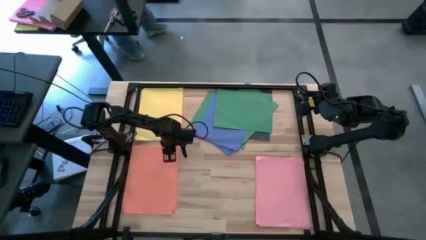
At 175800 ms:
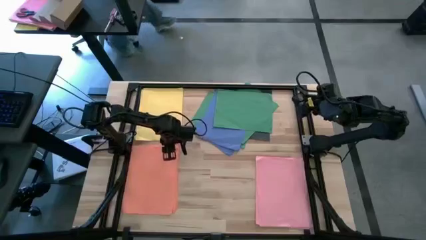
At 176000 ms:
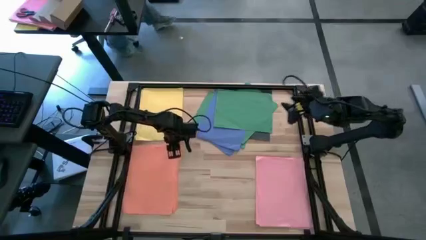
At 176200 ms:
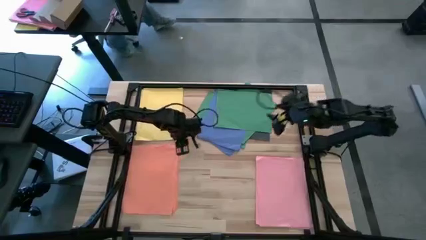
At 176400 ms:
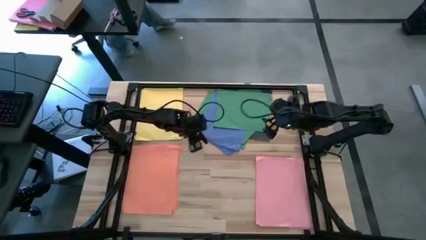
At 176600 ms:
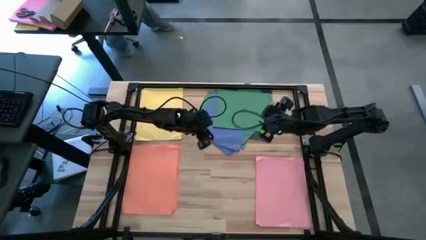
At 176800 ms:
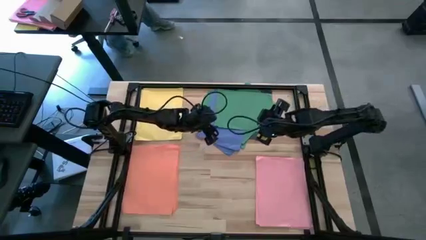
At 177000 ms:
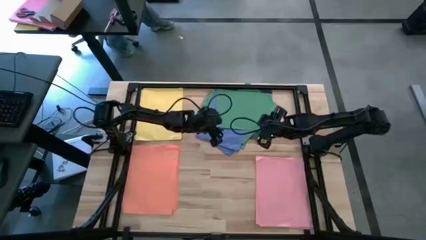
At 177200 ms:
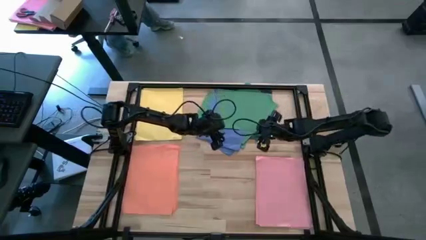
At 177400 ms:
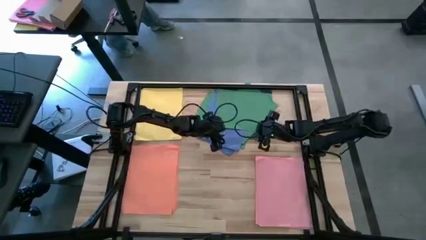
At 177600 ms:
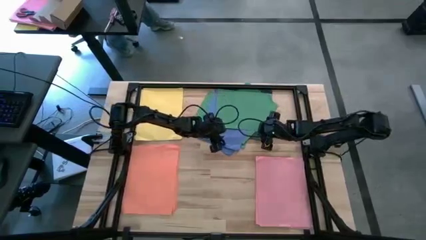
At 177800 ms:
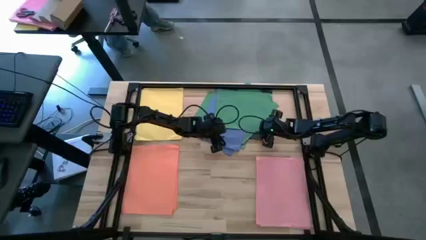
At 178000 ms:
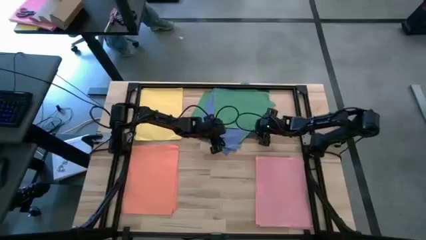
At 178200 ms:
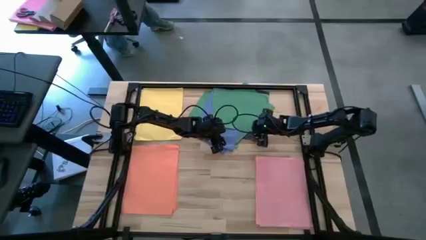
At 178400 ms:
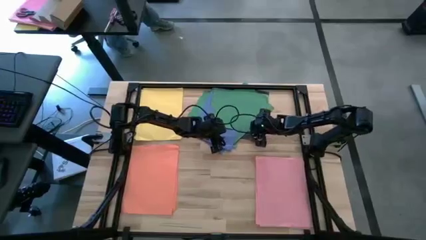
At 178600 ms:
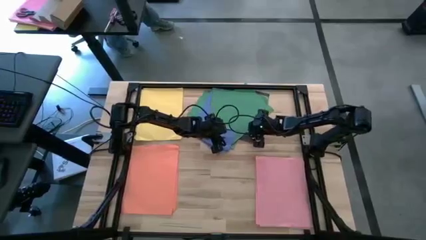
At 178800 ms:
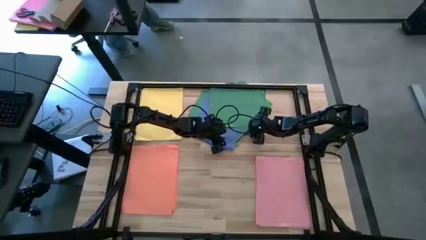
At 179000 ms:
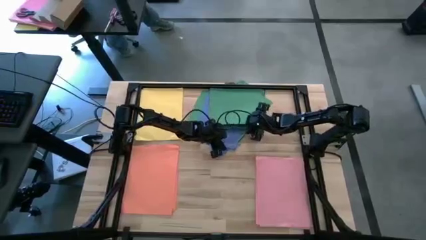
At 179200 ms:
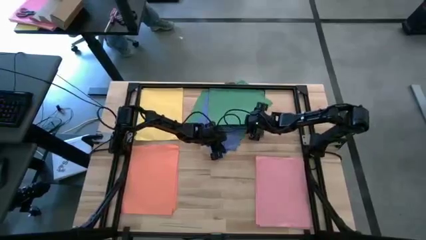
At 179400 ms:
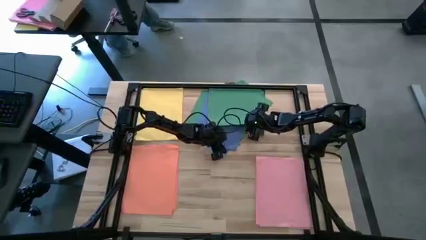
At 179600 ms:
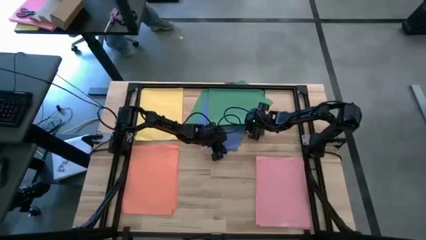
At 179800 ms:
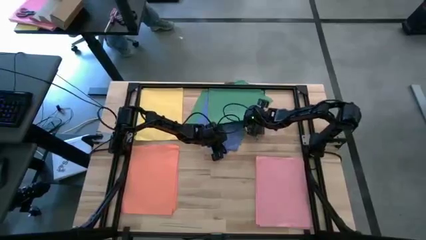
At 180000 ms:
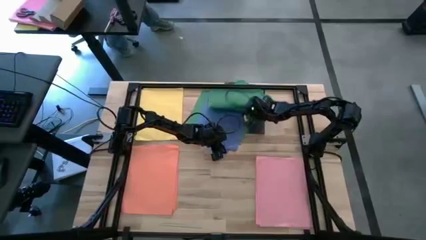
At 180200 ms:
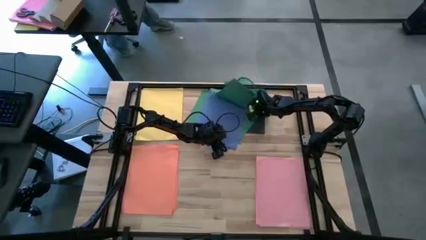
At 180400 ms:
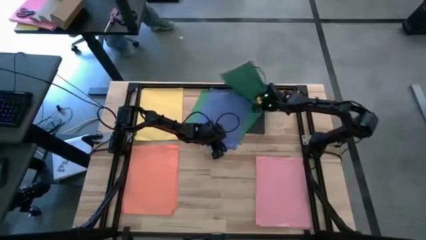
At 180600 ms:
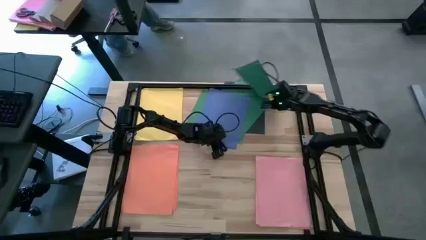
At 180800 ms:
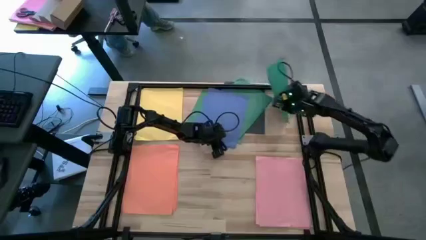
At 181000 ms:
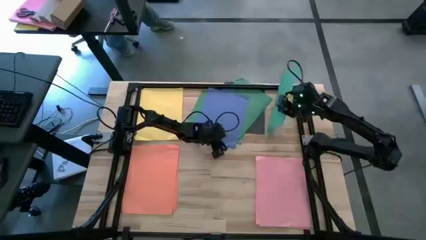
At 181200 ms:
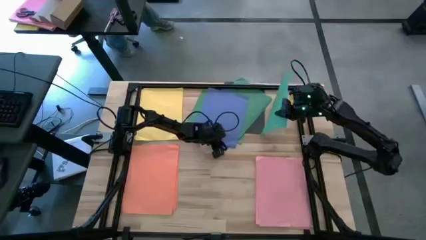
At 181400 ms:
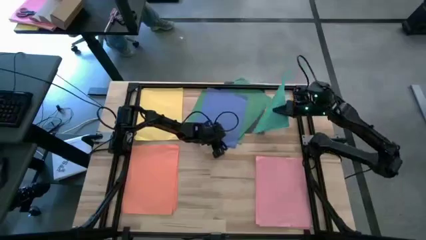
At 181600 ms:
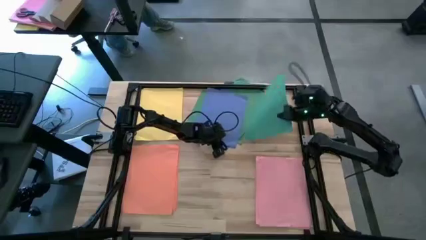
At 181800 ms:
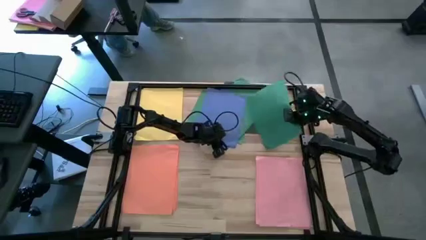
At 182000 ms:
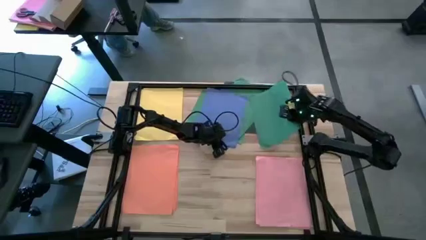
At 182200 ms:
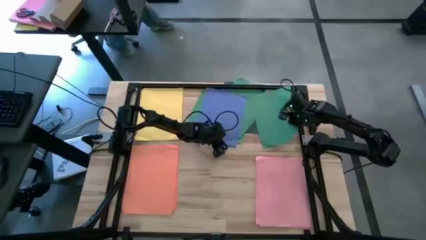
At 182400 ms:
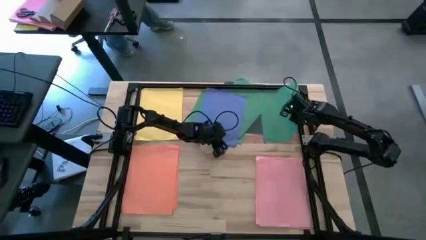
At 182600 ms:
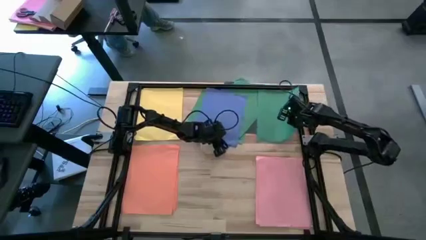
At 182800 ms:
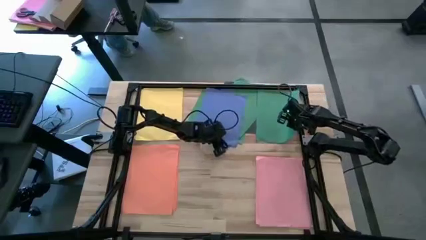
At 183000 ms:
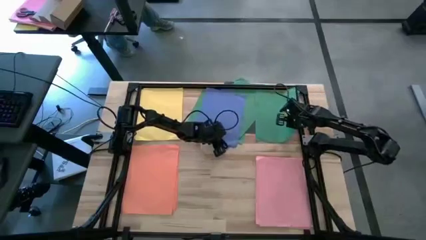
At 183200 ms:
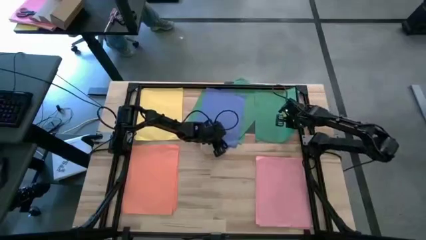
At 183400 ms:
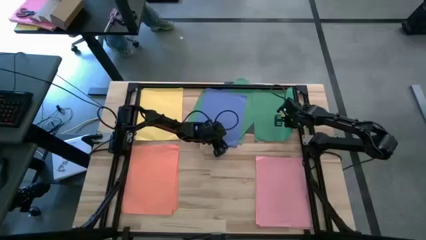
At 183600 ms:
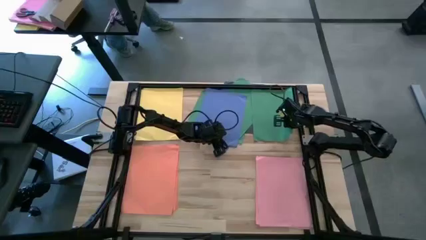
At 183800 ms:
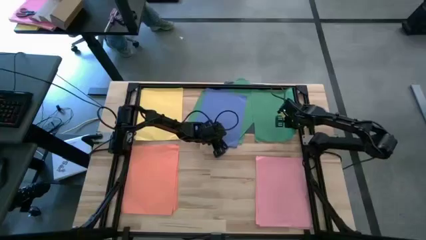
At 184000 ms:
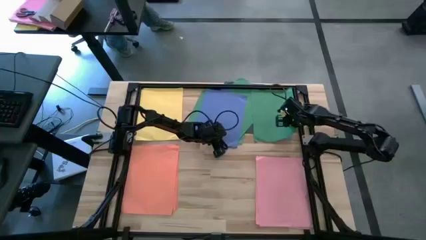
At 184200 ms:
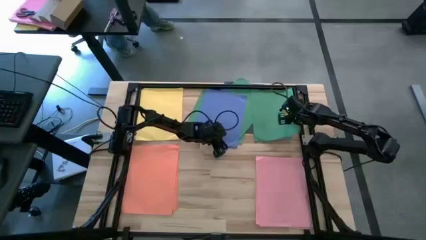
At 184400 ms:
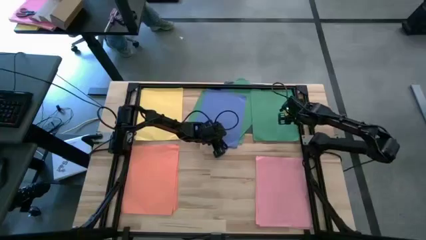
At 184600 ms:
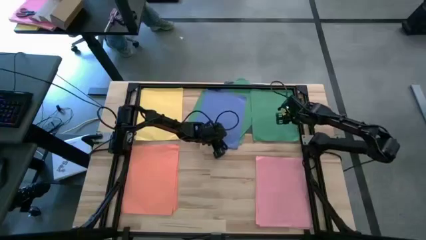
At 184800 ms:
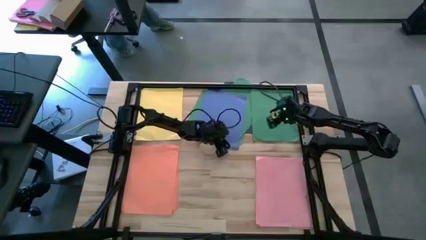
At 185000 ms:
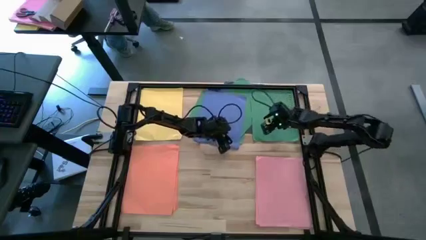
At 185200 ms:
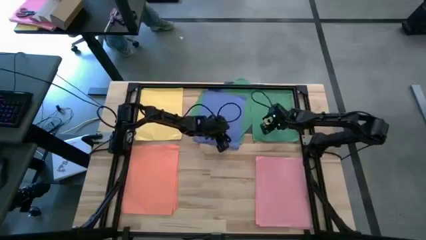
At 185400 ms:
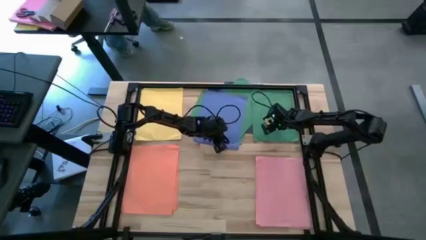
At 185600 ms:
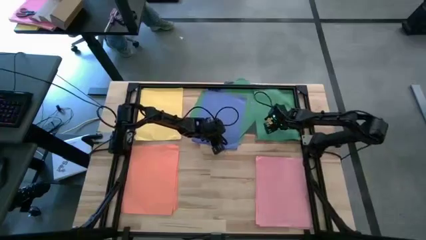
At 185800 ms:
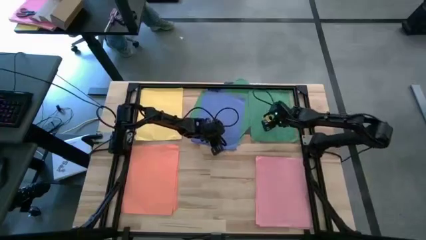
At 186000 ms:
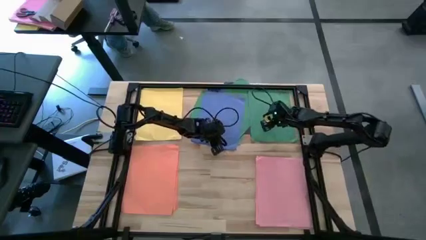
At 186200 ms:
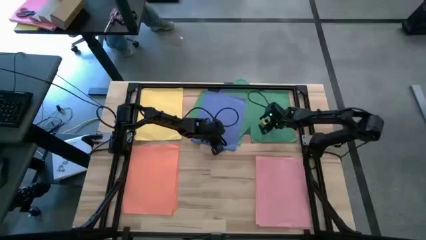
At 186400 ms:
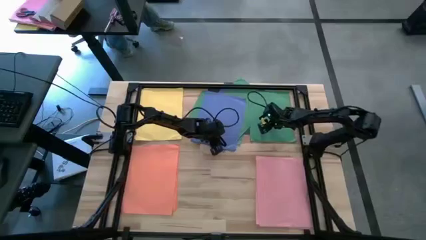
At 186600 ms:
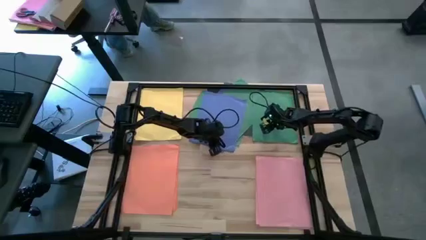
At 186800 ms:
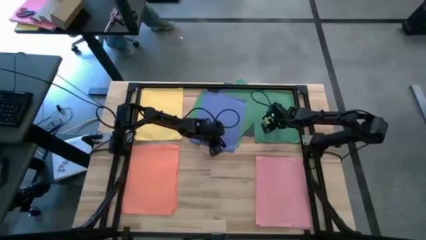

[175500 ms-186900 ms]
Task: Organize paper
Move the green paper to the top right of the table

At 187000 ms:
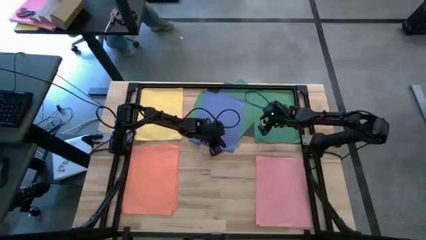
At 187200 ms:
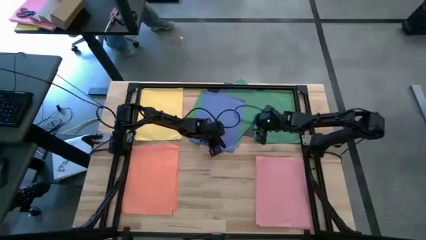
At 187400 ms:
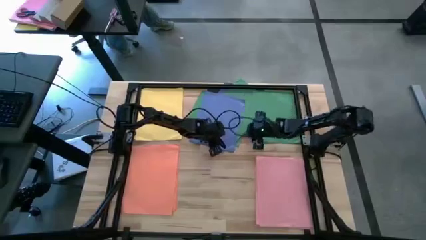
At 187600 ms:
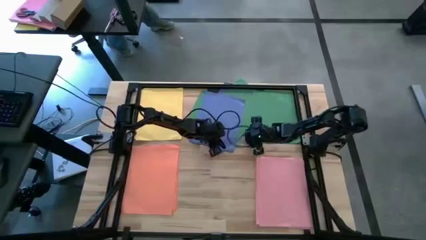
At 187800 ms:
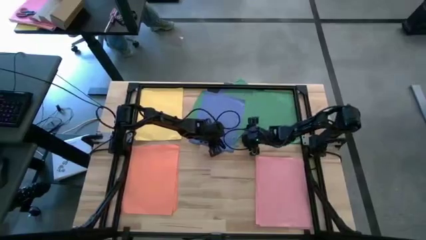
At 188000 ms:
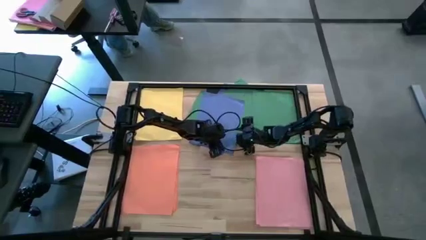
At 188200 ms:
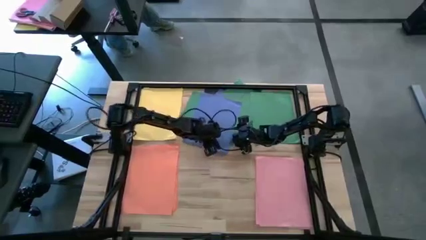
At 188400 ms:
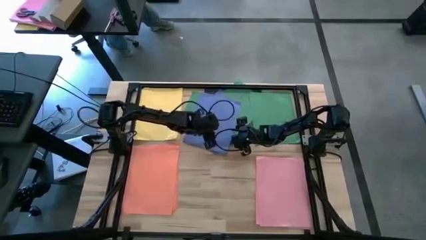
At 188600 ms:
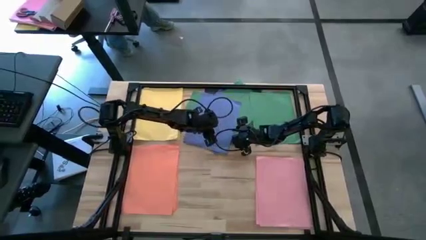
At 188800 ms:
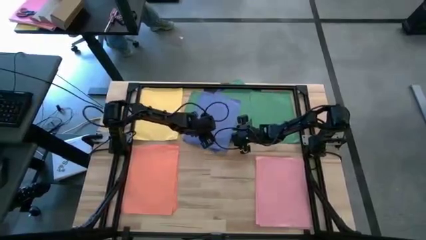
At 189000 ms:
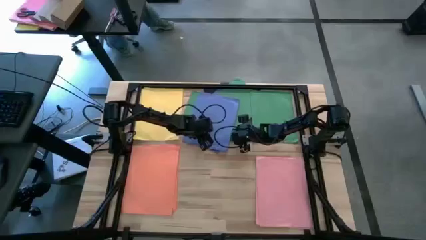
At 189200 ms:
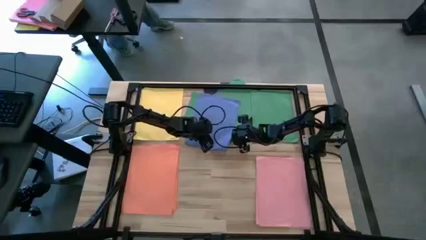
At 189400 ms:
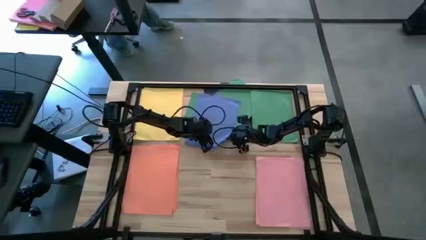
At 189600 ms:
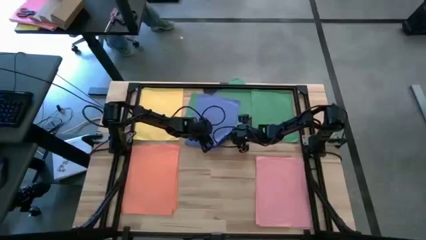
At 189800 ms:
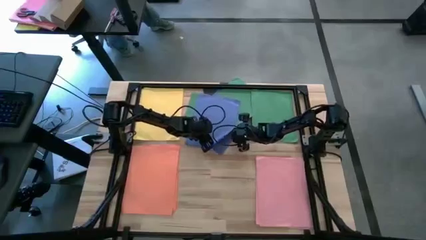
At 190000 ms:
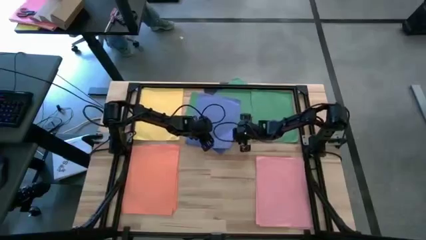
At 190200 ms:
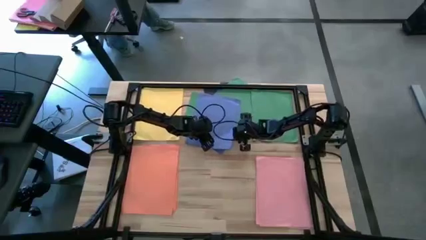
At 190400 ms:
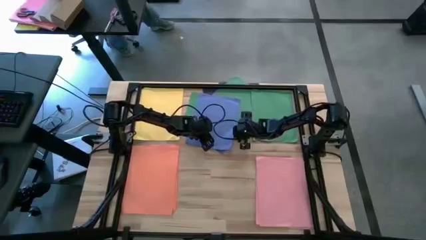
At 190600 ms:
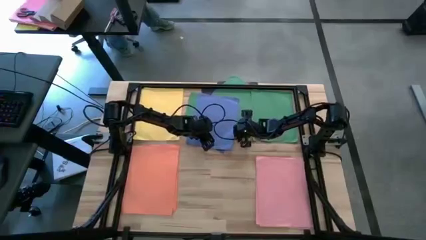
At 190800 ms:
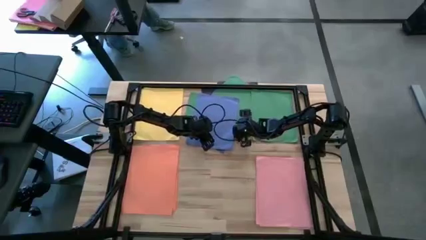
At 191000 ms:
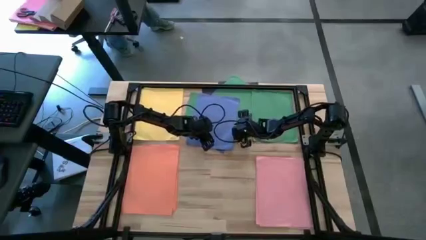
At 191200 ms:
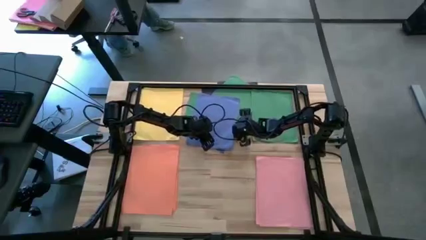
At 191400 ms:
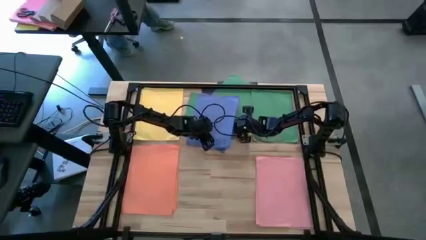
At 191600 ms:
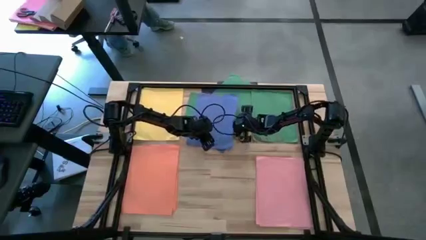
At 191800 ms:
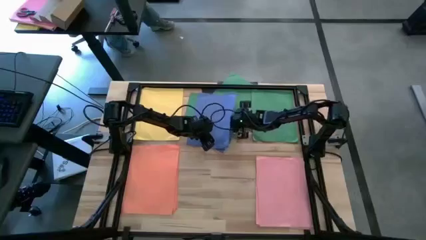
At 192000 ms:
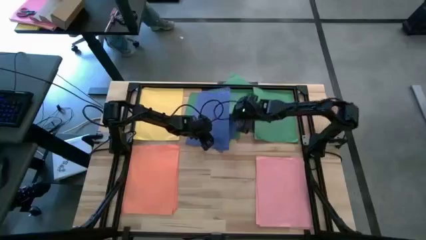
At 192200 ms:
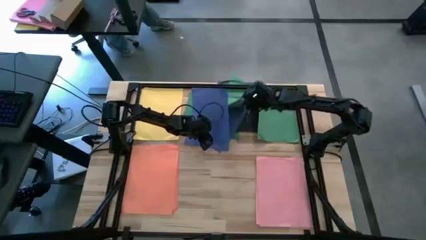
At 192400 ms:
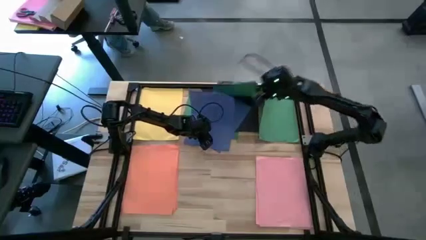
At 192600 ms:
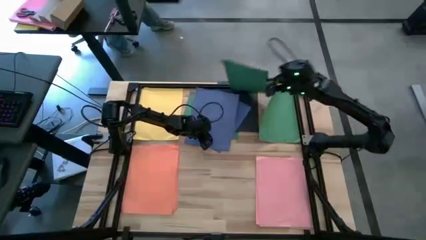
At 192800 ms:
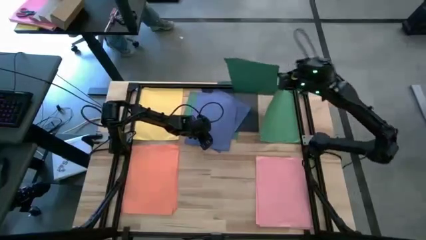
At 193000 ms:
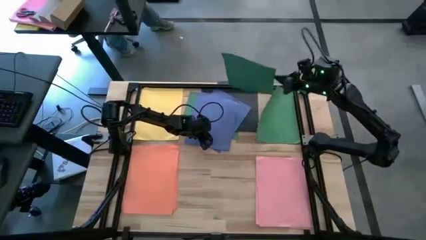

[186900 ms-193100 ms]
Stack the green paper on top of the other green paper
